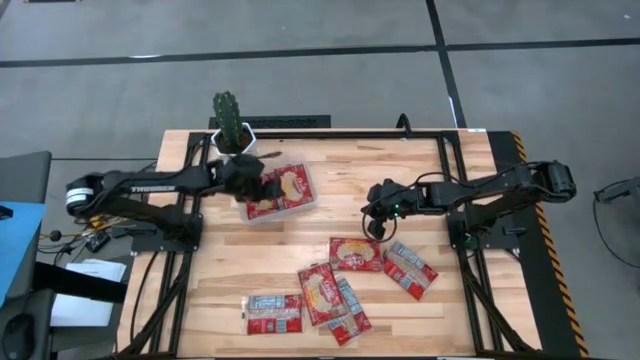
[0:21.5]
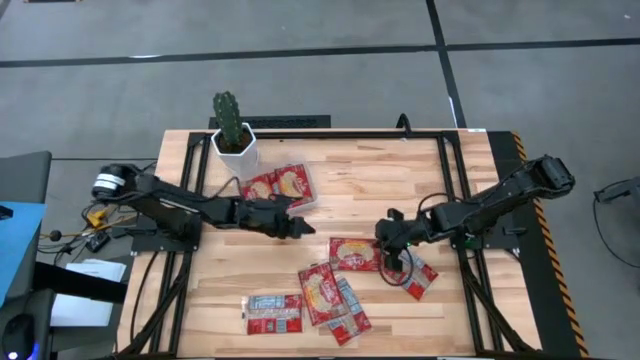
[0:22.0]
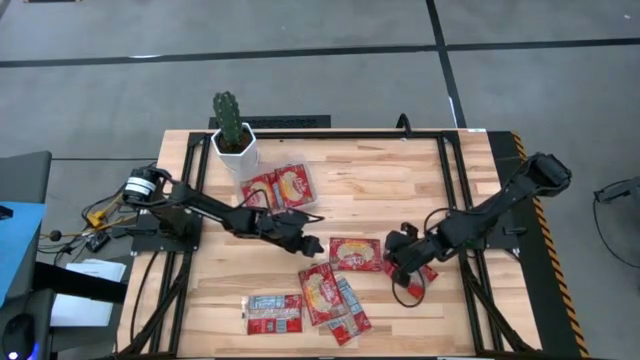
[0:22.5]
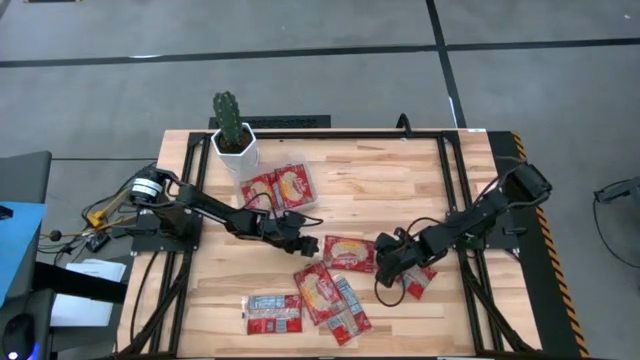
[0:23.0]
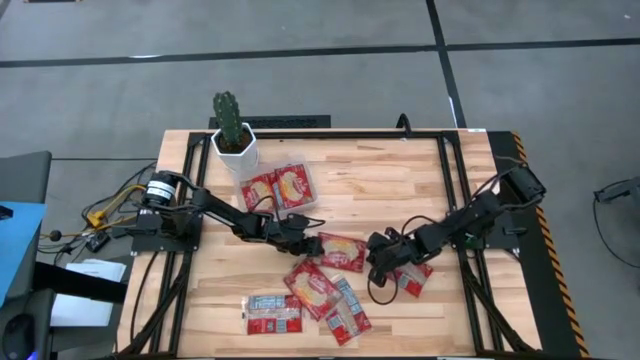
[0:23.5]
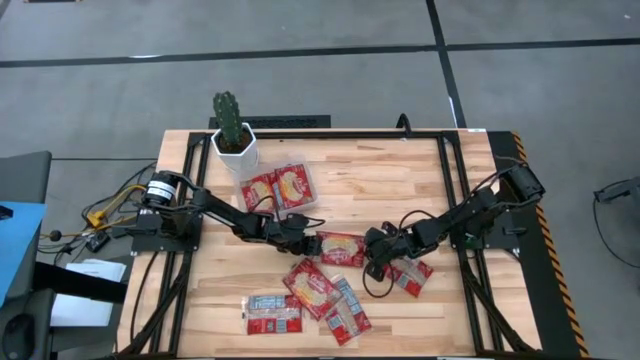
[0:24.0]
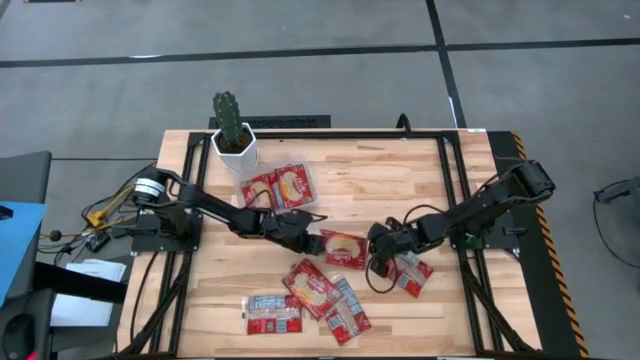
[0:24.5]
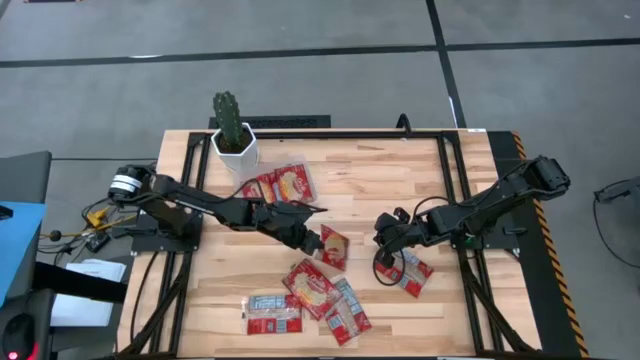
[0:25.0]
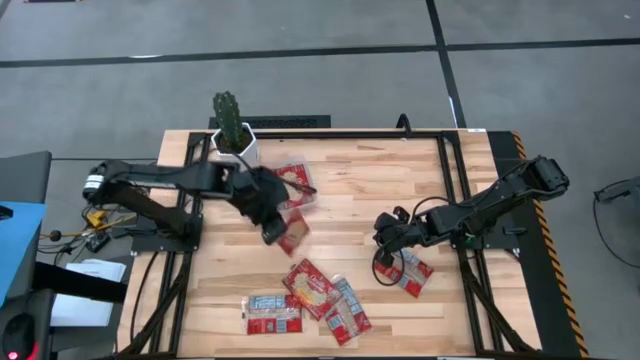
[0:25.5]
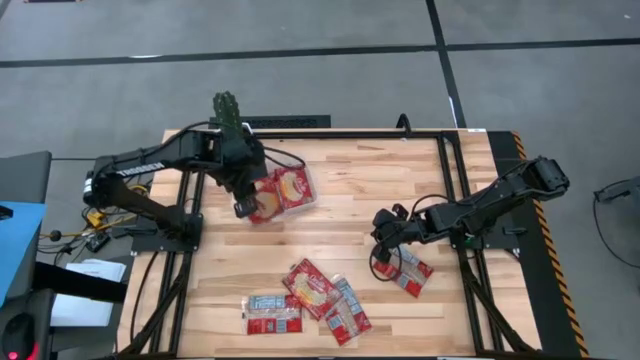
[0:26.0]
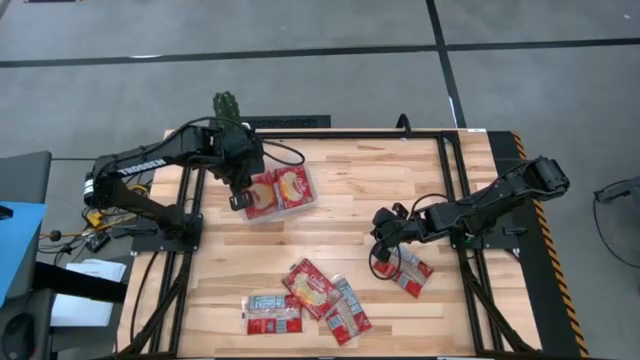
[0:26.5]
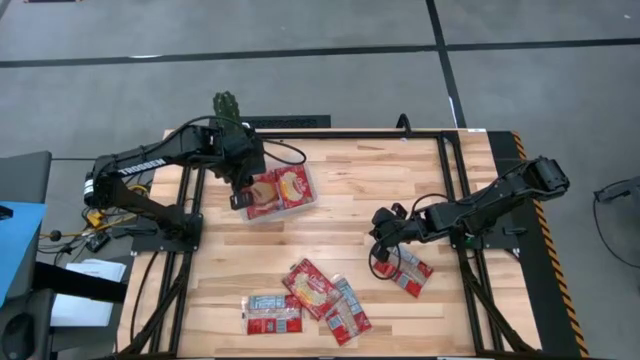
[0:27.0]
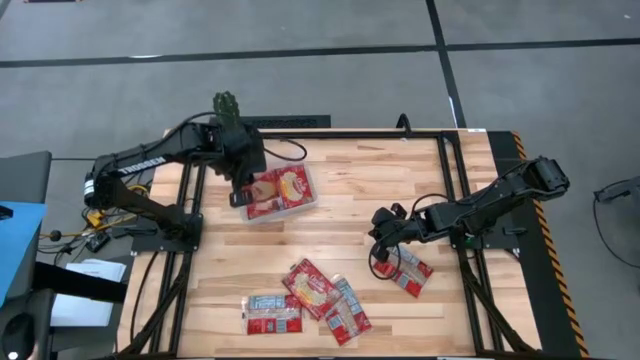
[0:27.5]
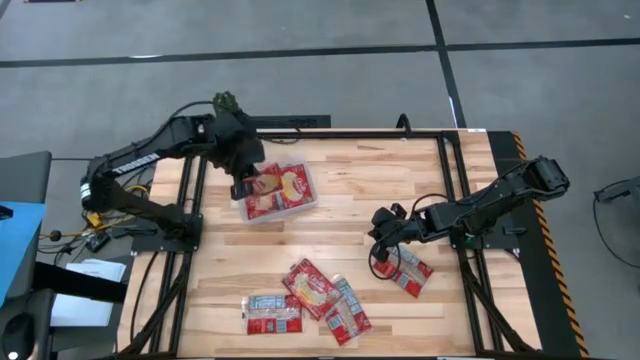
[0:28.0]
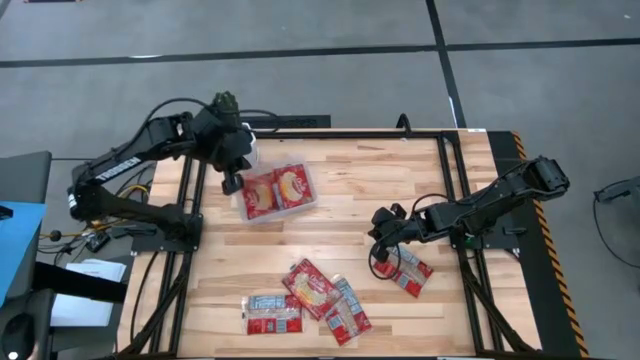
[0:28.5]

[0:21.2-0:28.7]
Task: Sort popcorn bags into baskets
Put the red popcorn bag into the transparent bin

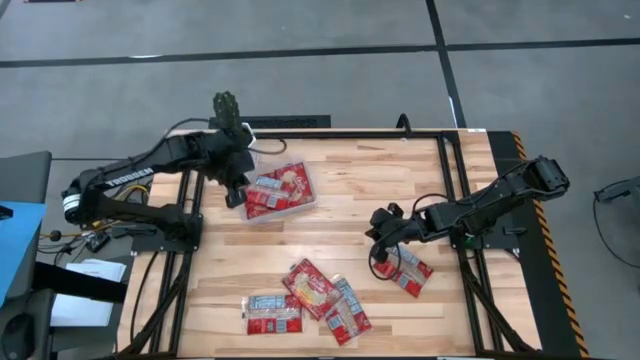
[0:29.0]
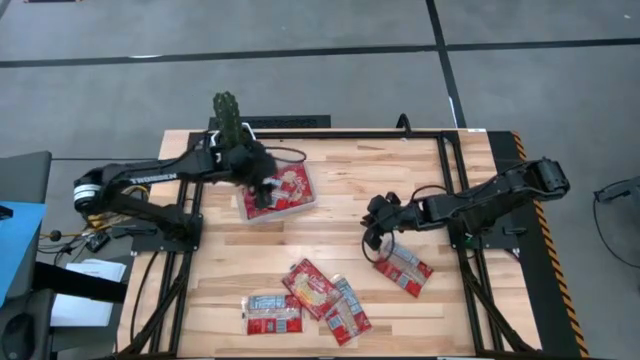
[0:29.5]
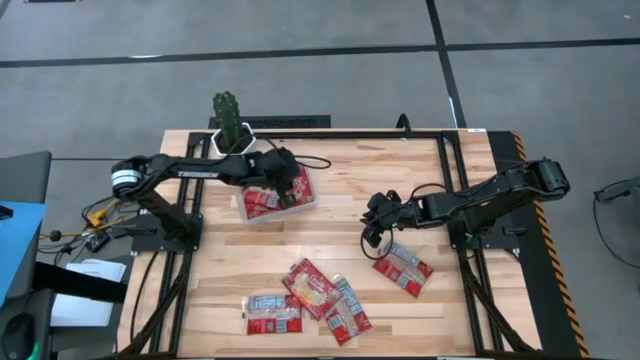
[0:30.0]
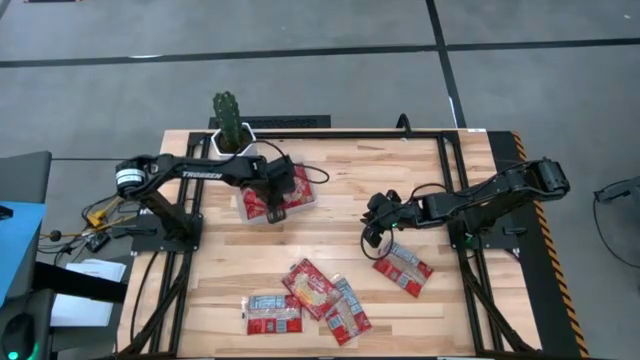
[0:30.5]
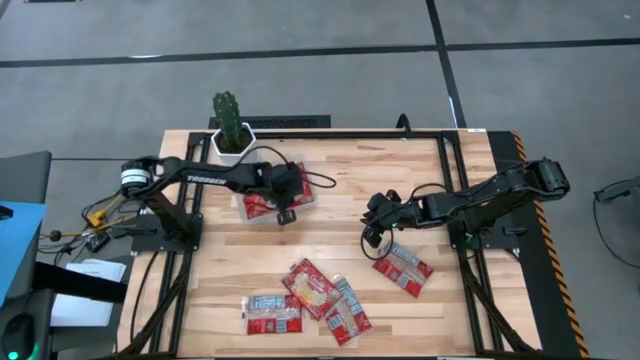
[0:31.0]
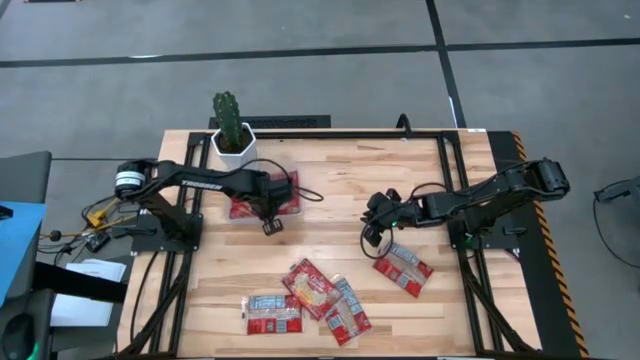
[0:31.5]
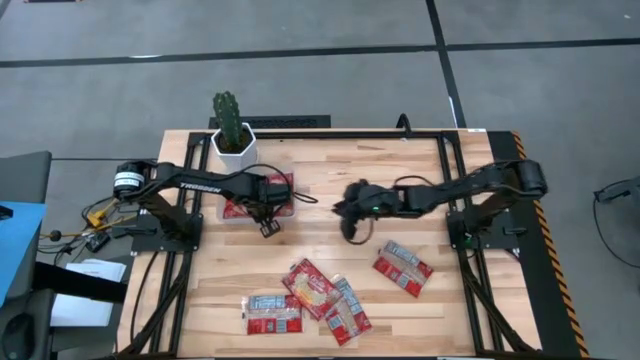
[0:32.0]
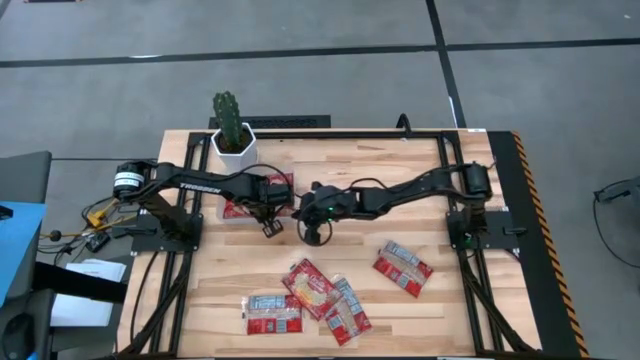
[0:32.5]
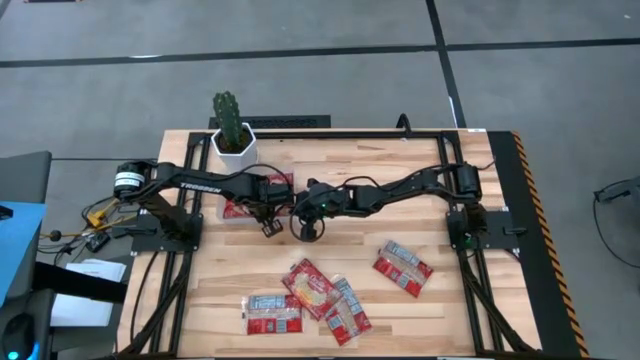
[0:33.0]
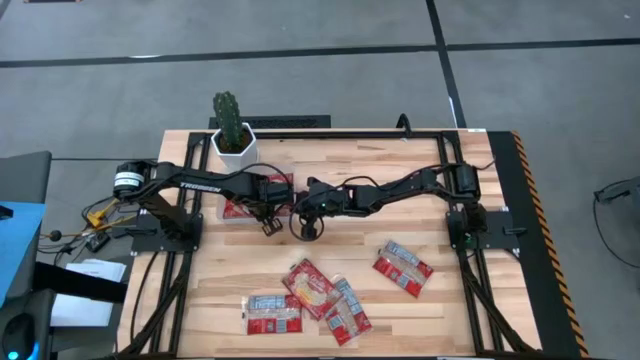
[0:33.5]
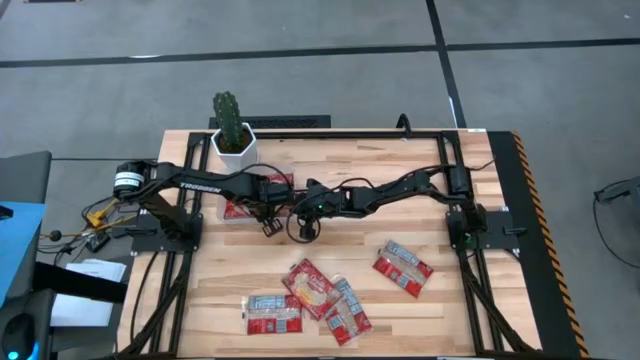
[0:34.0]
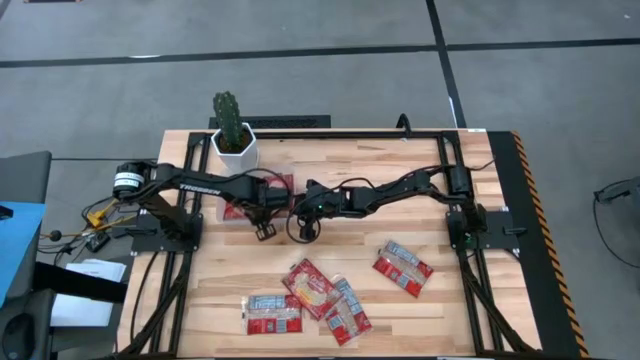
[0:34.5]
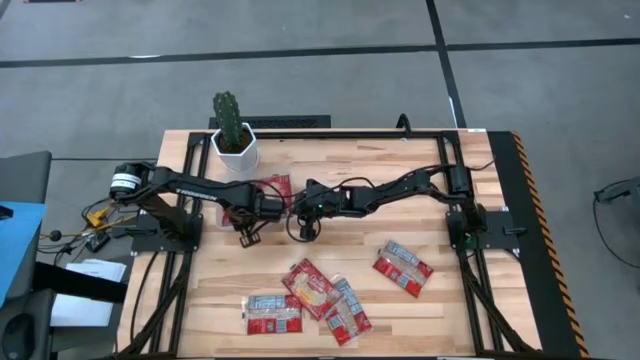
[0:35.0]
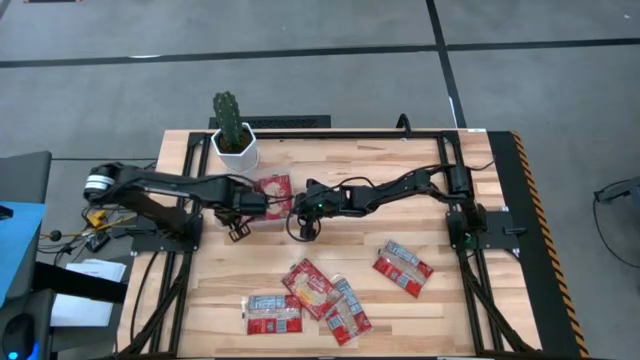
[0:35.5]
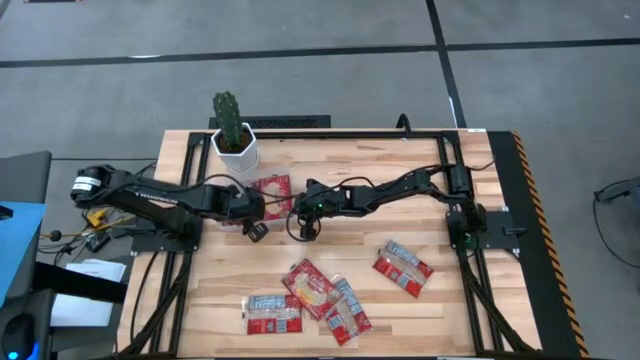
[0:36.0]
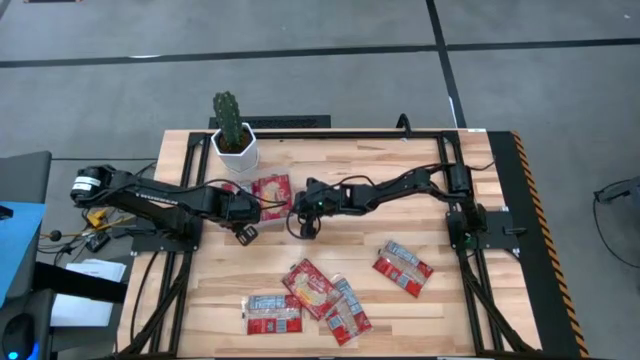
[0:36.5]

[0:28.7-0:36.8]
Put the red popcorn bag into the transparent bin

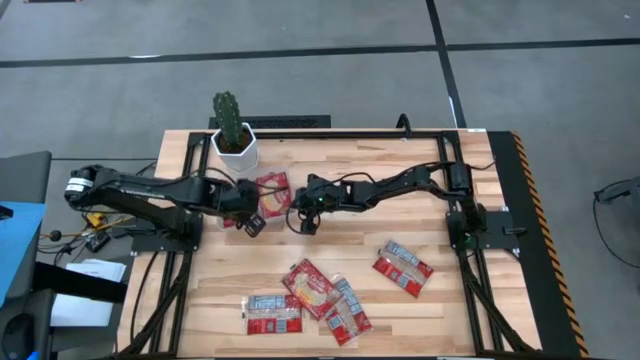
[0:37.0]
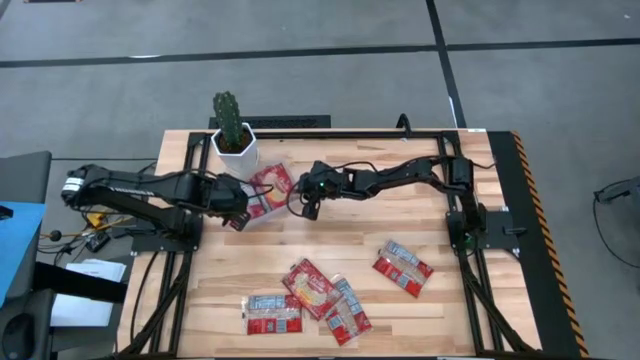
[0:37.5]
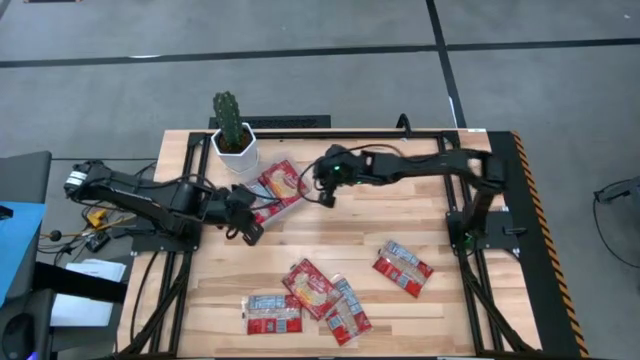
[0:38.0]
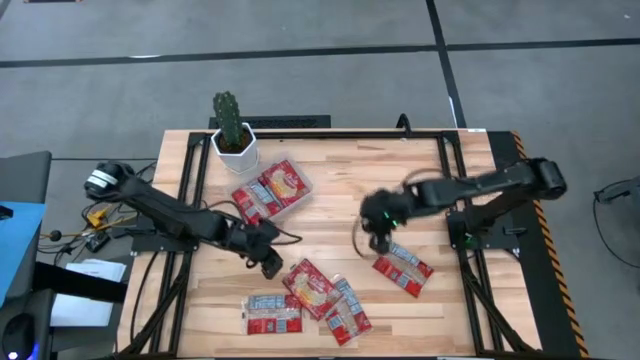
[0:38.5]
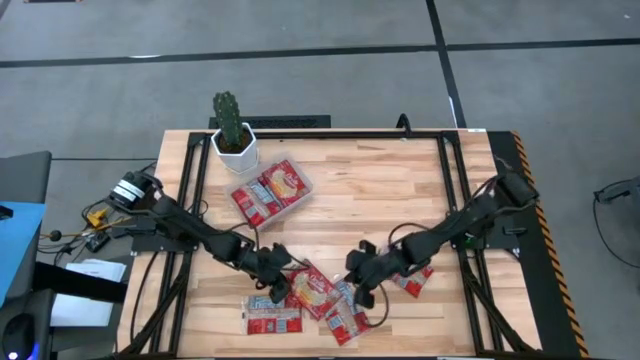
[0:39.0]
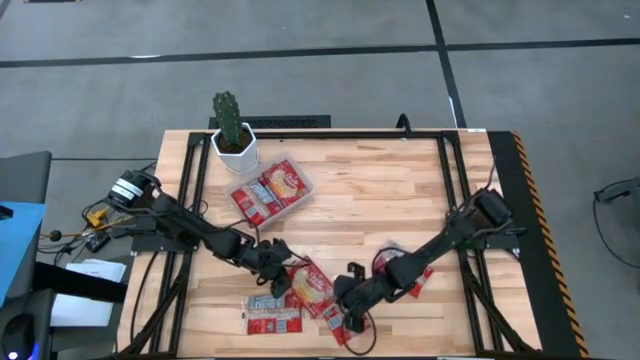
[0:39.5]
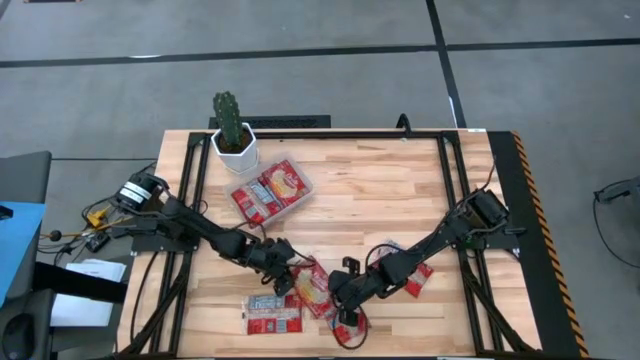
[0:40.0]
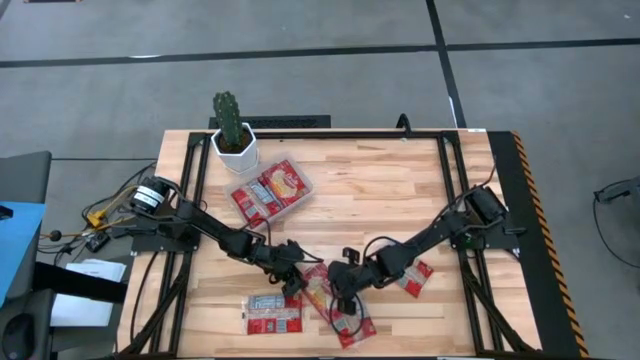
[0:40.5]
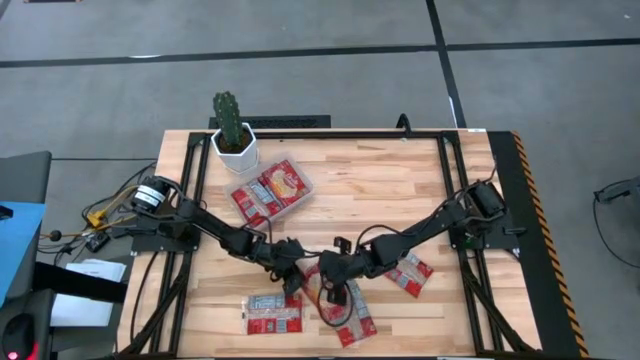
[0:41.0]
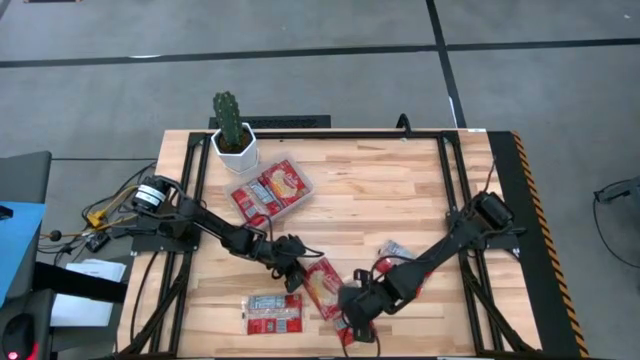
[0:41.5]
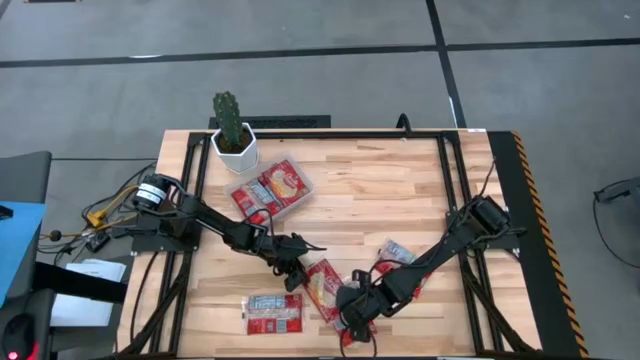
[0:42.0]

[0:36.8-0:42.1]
Put the red popcorn bag into the transparent bin
